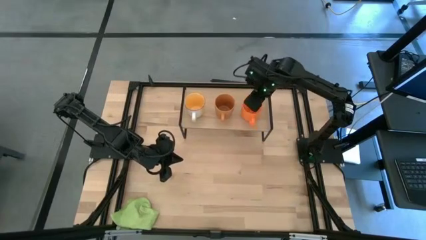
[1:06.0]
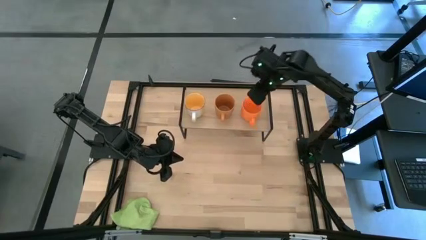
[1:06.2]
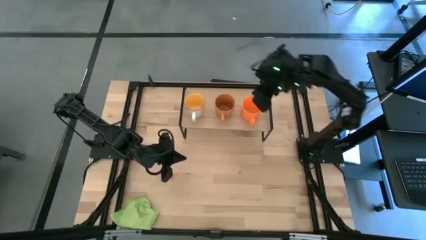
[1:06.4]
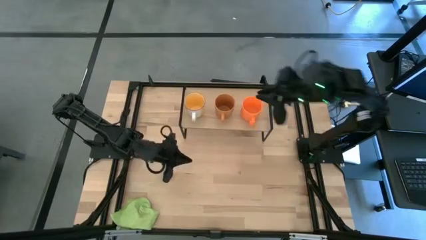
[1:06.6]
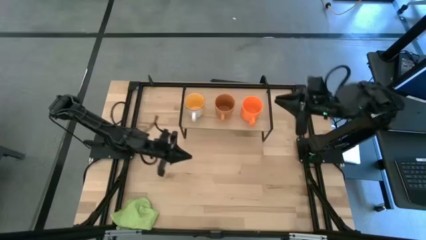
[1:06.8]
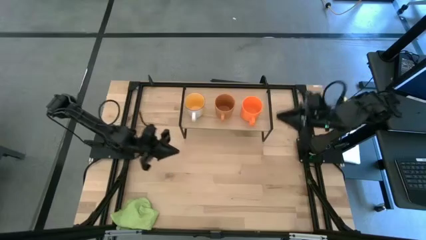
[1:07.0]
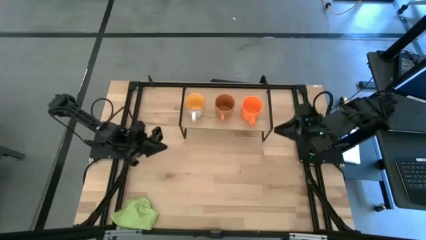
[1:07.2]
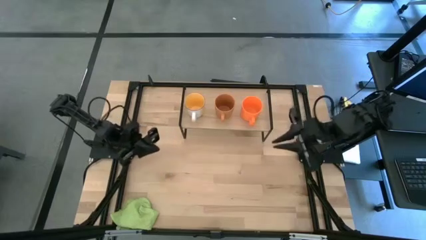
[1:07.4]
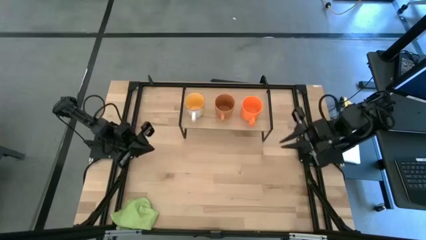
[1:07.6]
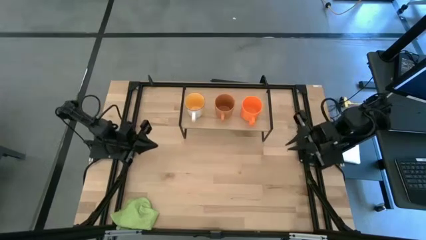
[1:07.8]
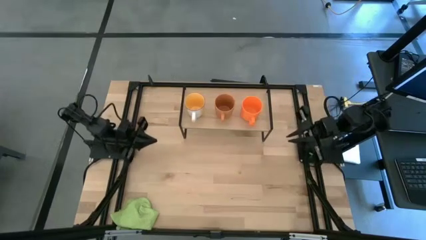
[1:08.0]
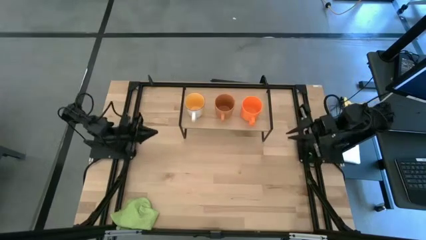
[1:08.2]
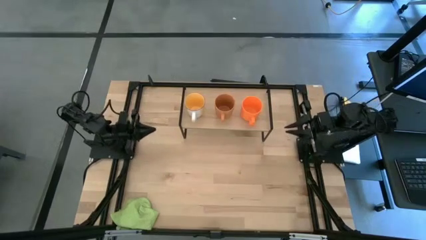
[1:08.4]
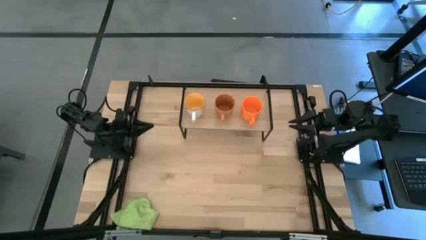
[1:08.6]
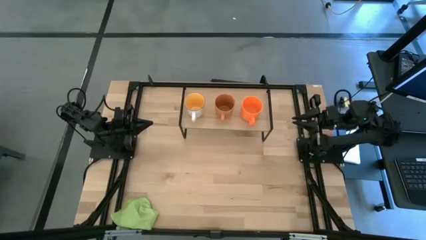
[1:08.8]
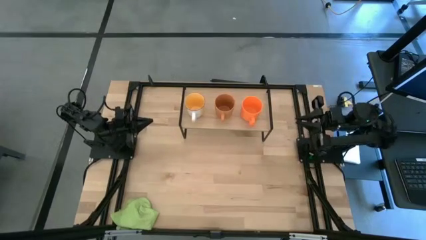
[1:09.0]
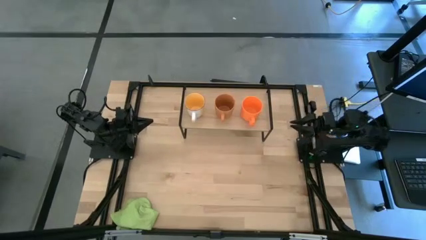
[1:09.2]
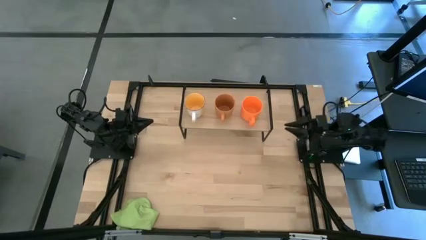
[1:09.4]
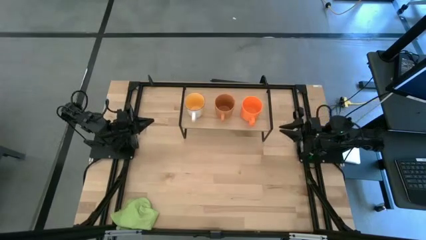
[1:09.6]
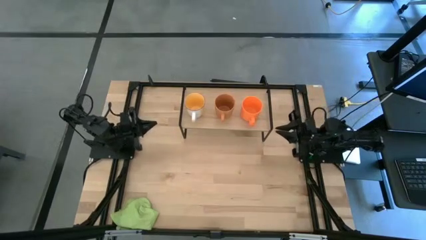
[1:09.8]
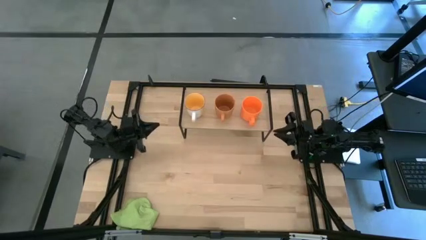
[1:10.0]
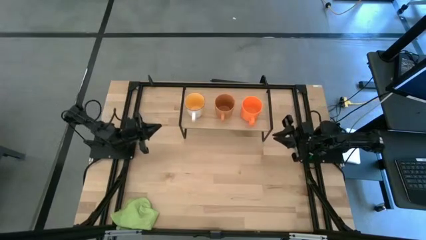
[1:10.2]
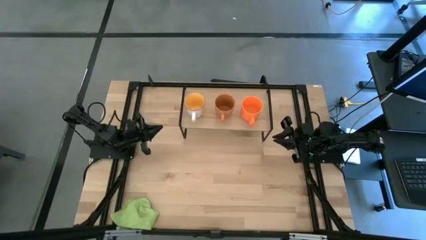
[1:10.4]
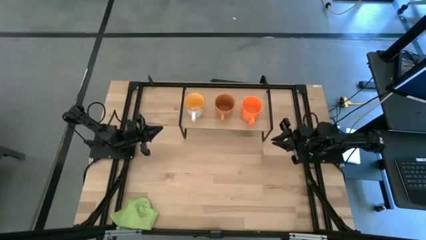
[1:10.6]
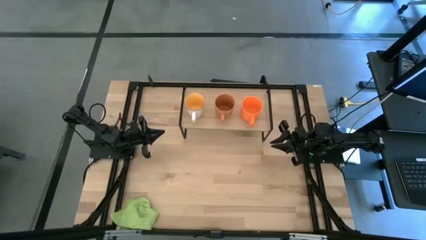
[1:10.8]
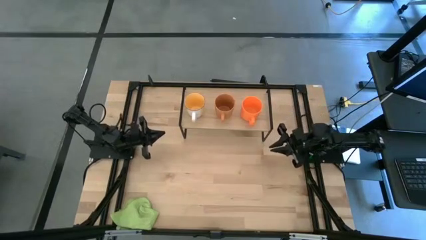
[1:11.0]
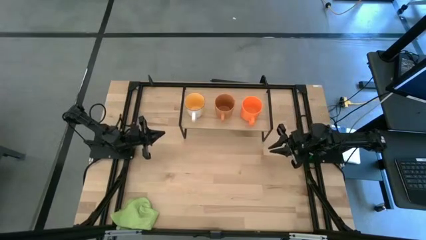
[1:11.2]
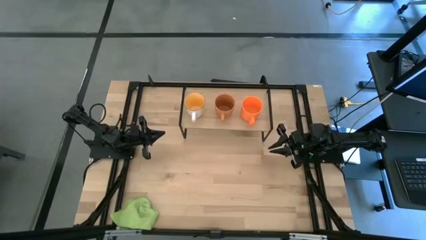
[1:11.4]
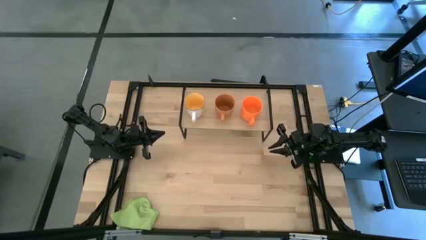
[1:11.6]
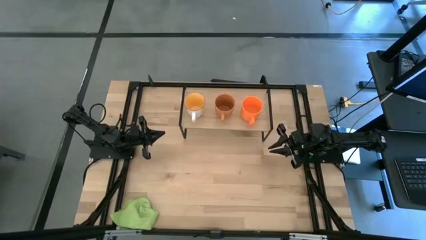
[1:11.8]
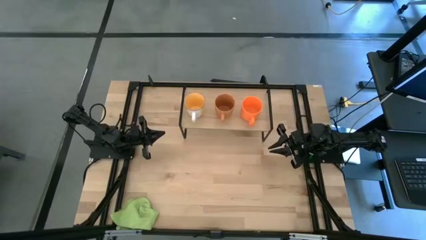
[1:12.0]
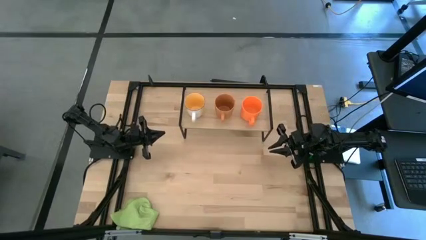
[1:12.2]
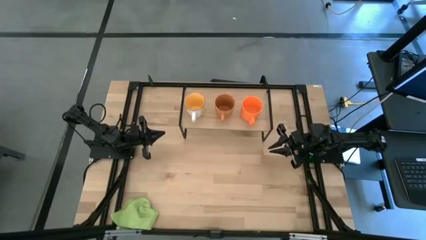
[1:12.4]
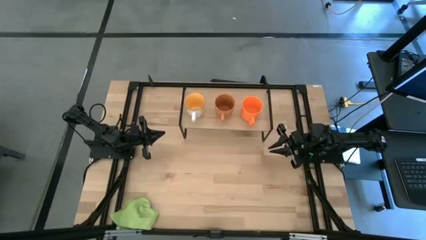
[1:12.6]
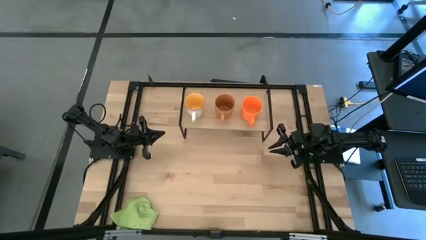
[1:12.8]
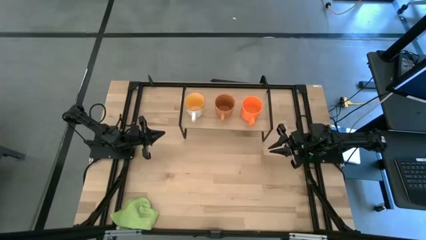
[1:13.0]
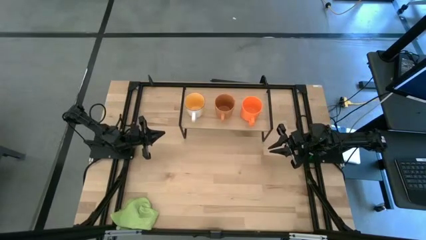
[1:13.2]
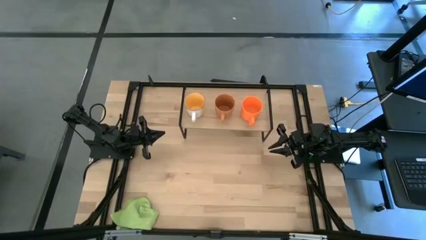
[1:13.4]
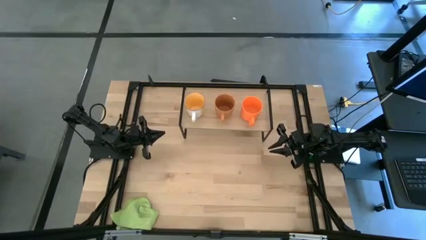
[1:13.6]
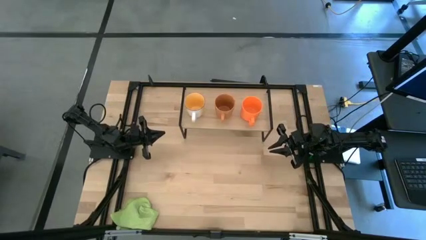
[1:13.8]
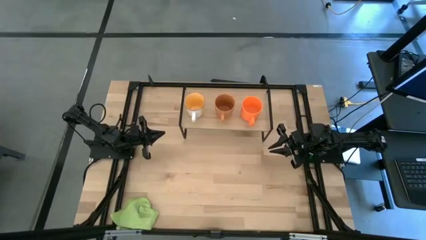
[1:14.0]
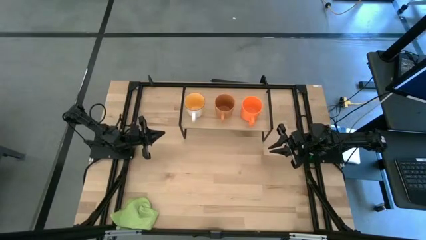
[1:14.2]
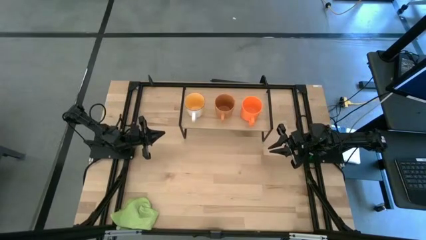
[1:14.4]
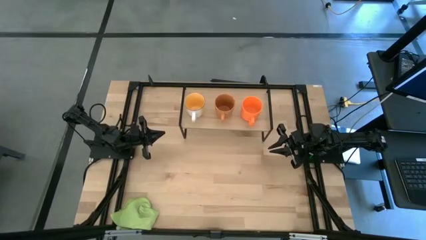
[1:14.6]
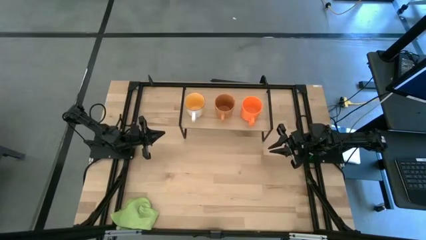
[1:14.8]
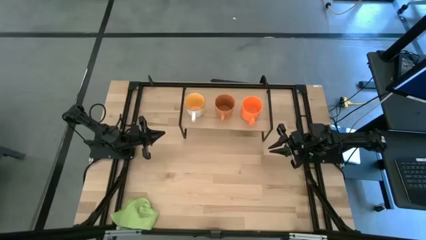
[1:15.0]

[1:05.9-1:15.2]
Task: Stack small to large cups/mugs on shelf
Return to Home Position

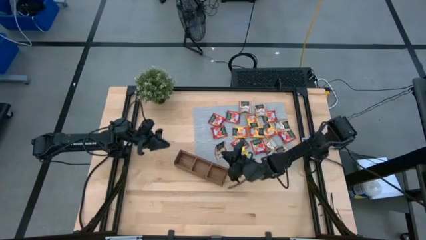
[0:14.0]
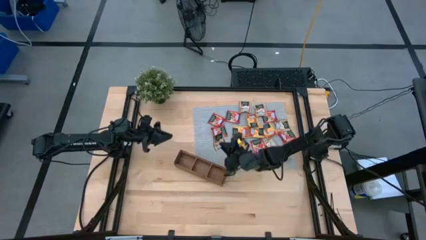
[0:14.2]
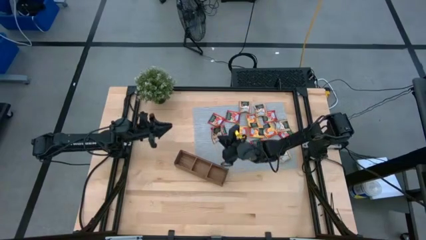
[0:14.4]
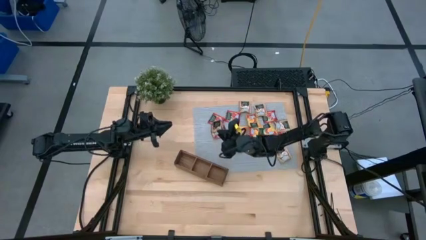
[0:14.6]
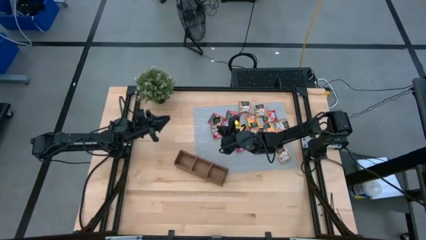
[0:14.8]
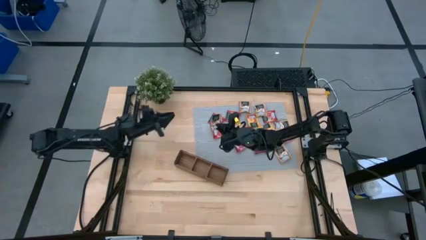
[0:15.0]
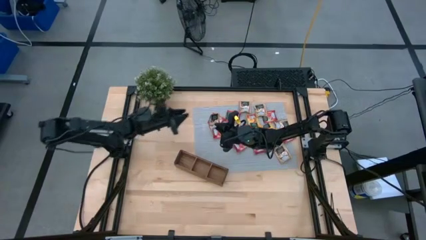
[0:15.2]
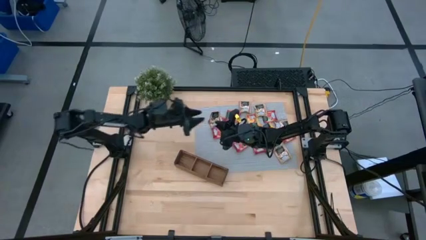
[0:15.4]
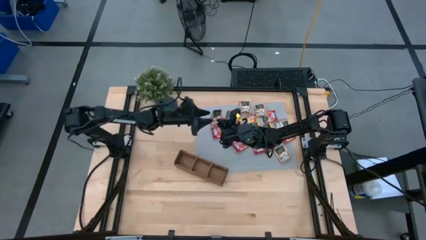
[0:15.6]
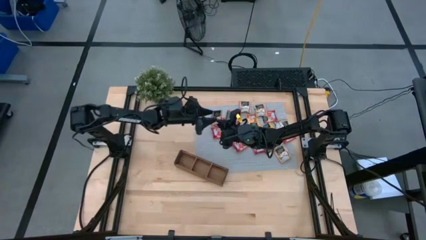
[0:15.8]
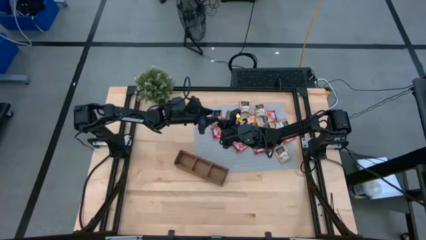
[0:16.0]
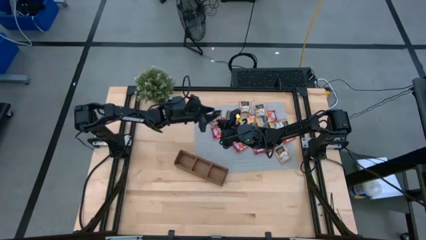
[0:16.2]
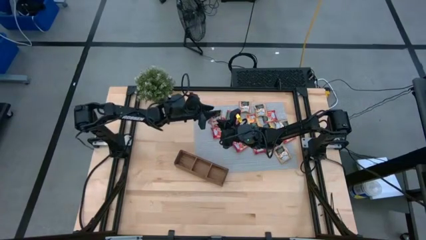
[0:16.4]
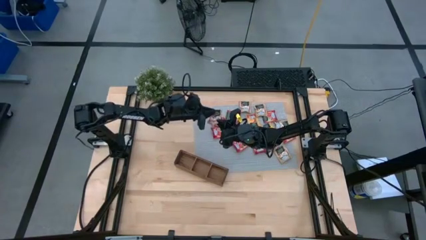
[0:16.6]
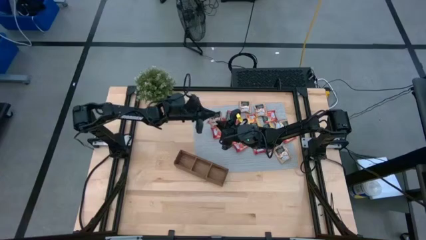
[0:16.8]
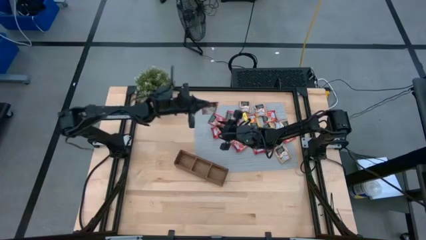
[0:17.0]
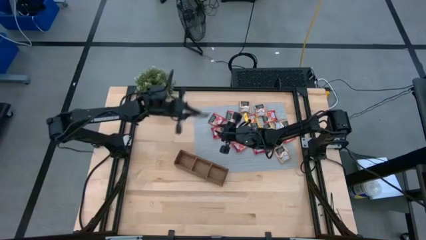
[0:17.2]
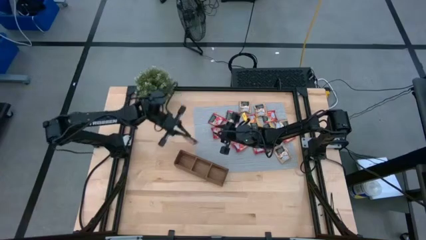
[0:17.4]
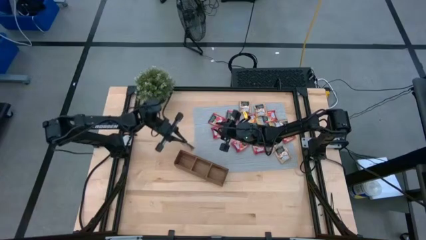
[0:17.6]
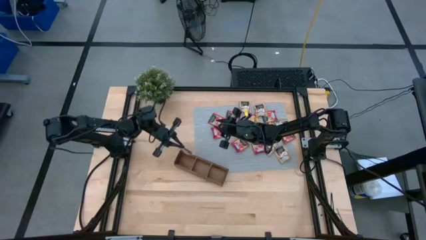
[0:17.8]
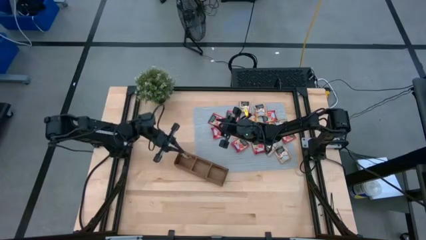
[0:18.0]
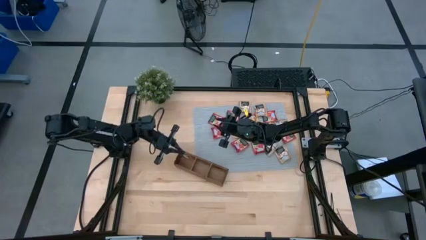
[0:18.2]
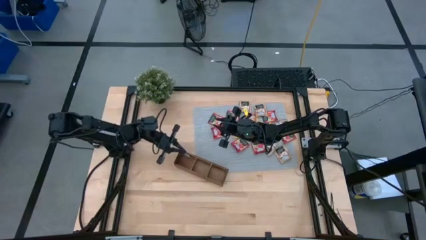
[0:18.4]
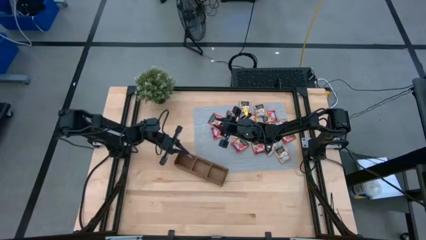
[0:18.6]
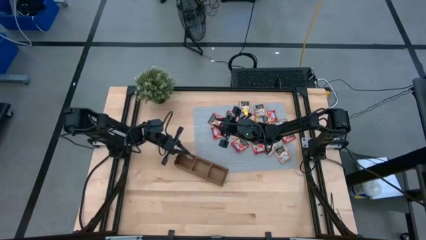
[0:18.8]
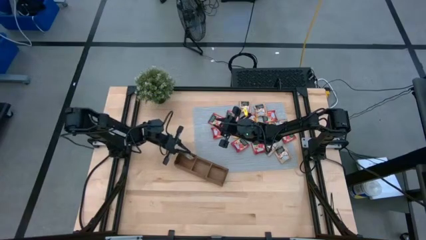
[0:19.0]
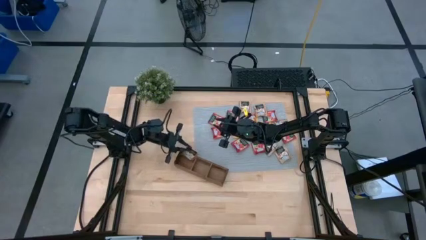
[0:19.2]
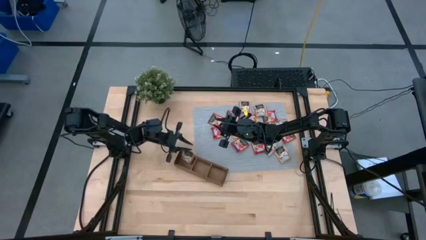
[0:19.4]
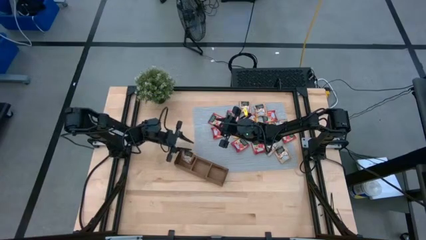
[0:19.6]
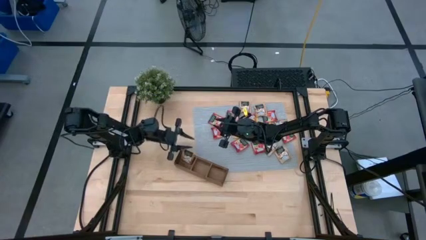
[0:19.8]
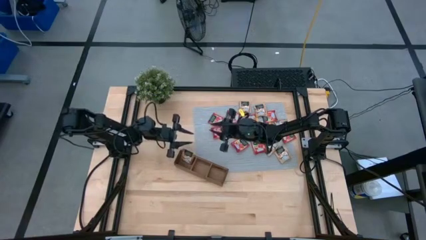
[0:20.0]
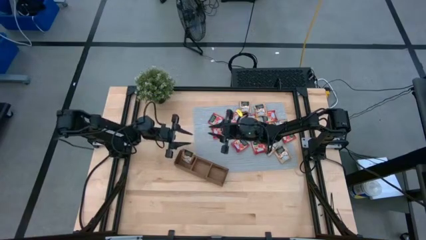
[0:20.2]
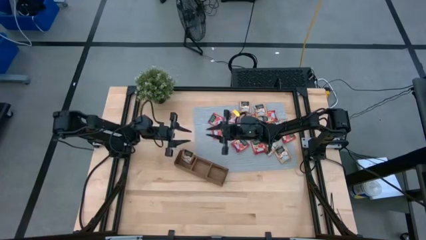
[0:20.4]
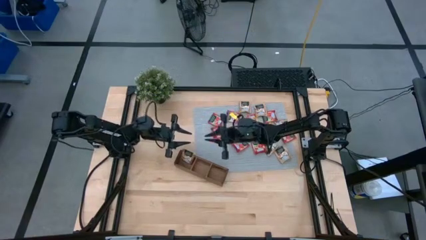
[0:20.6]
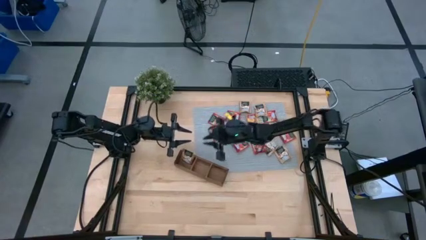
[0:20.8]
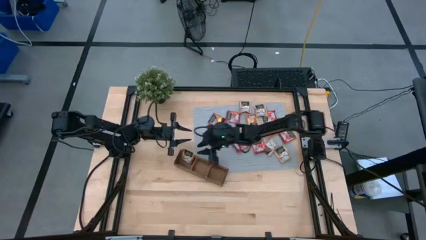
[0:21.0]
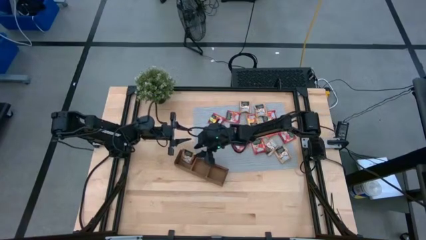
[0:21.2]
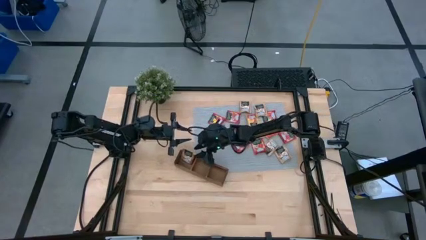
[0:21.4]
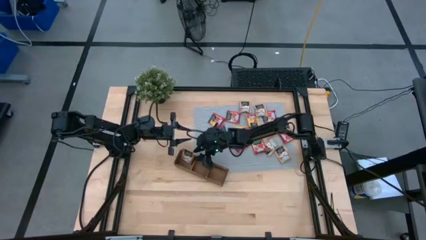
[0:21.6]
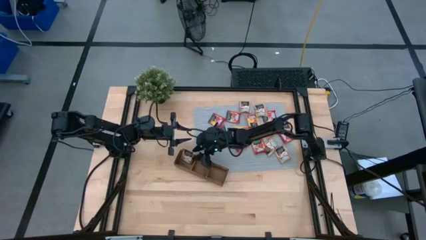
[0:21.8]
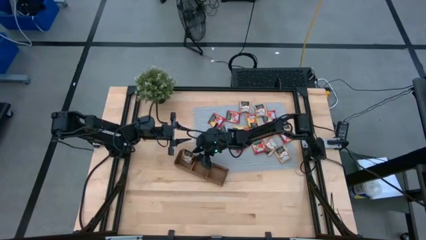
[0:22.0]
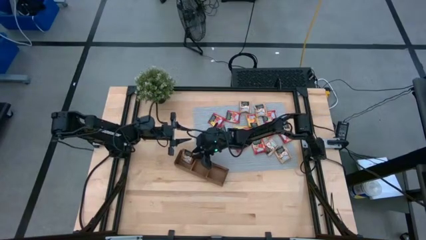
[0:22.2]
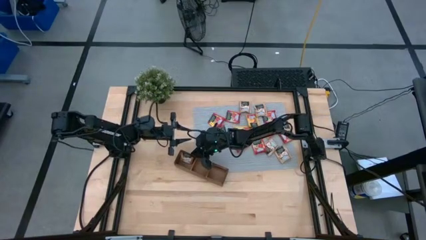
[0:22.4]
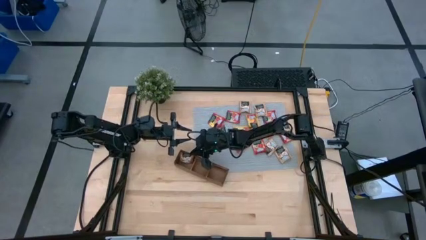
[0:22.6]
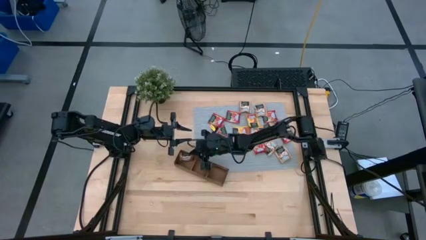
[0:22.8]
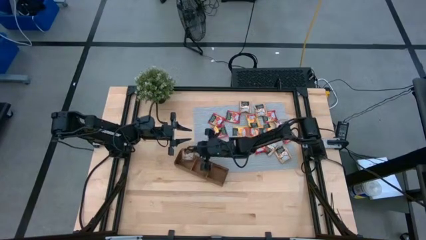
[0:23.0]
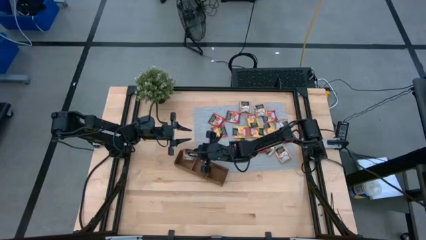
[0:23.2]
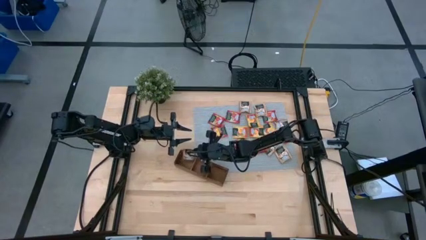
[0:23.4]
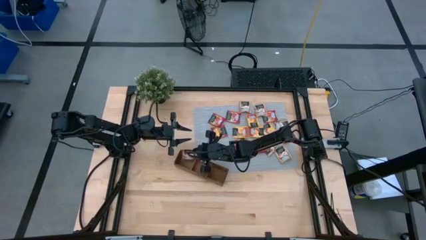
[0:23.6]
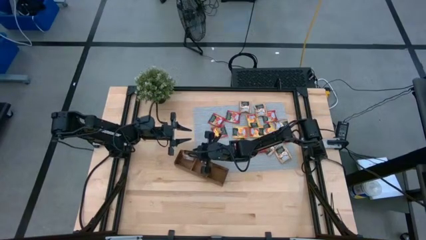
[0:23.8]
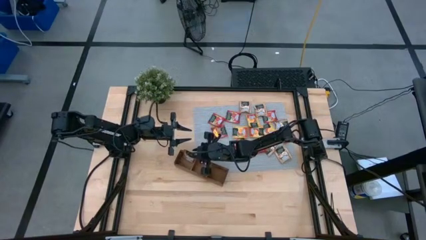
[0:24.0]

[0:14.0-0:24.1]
Task: Pick & Place Tea
Put the brown tea bag into the left section of the wooden organizer
